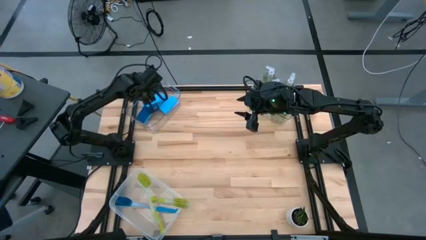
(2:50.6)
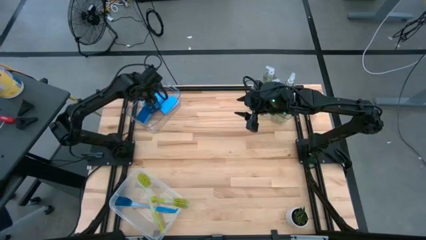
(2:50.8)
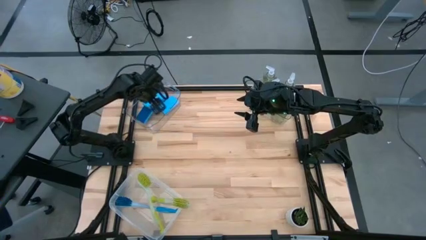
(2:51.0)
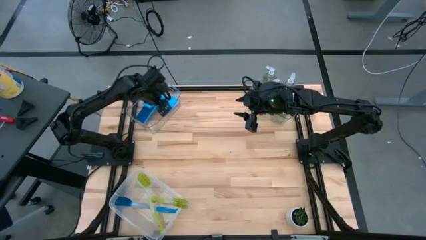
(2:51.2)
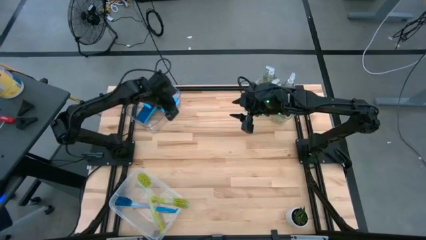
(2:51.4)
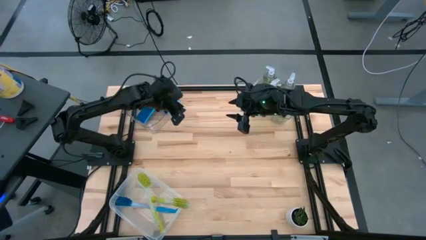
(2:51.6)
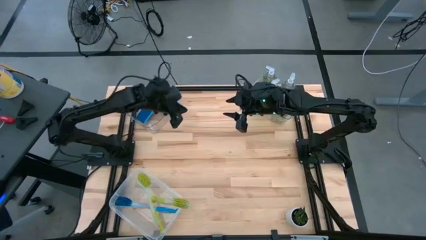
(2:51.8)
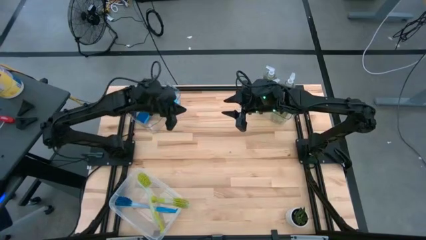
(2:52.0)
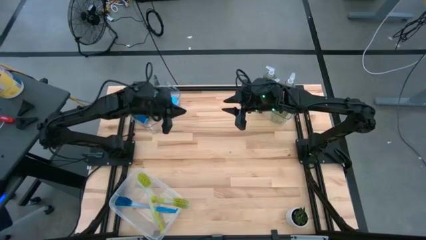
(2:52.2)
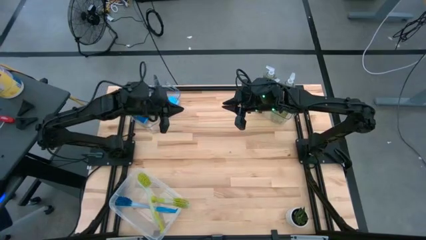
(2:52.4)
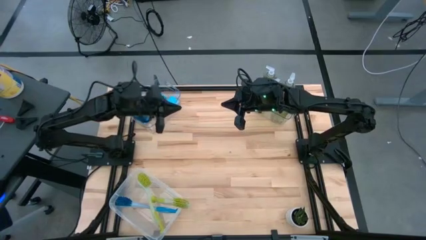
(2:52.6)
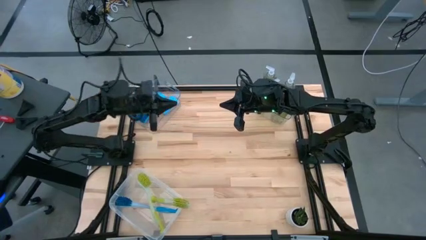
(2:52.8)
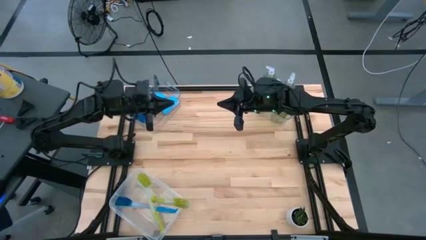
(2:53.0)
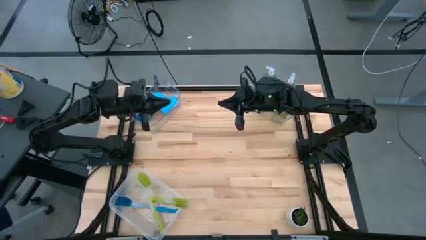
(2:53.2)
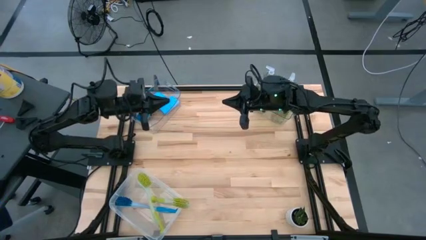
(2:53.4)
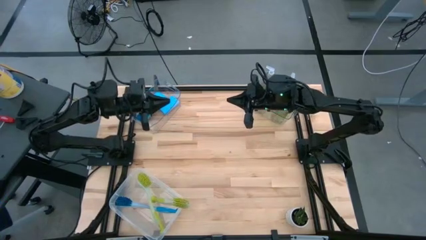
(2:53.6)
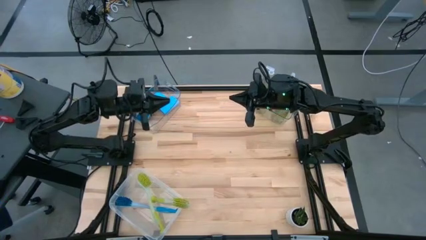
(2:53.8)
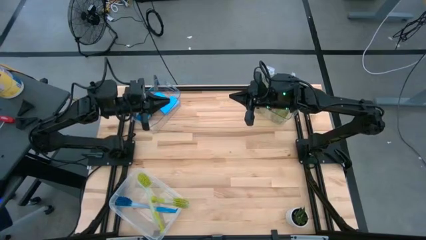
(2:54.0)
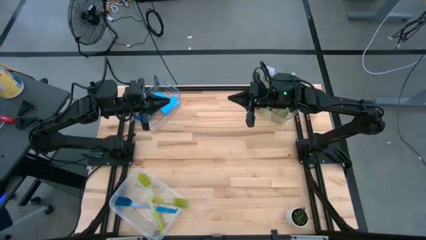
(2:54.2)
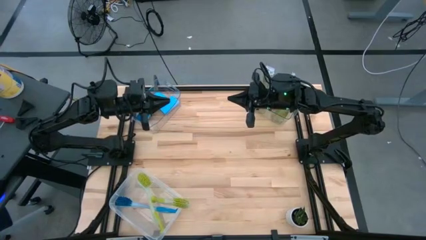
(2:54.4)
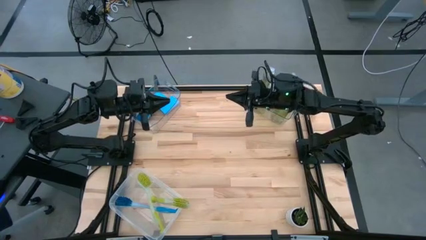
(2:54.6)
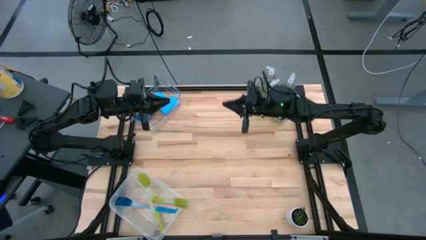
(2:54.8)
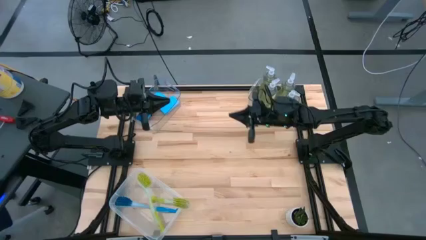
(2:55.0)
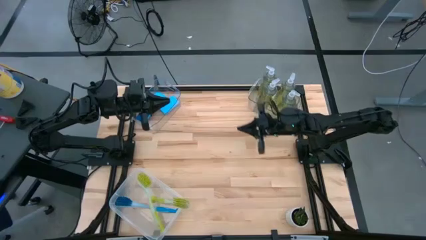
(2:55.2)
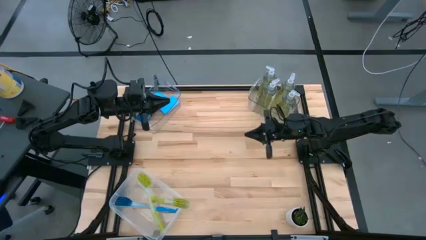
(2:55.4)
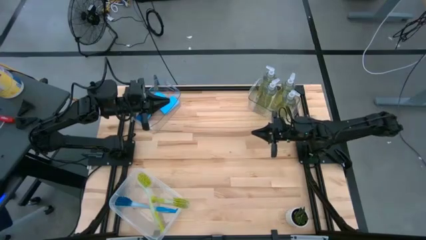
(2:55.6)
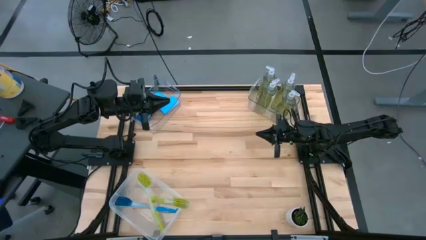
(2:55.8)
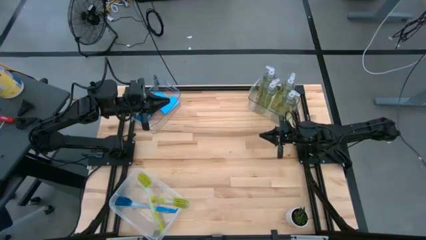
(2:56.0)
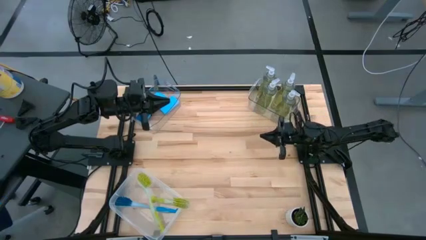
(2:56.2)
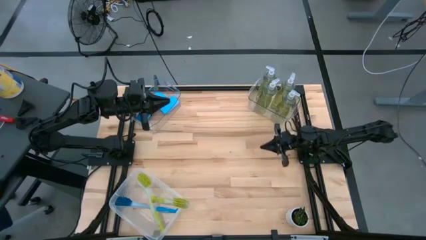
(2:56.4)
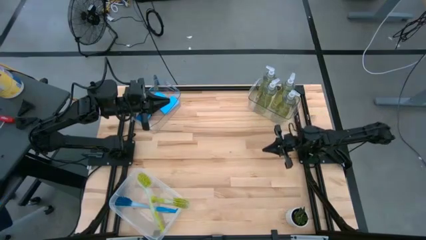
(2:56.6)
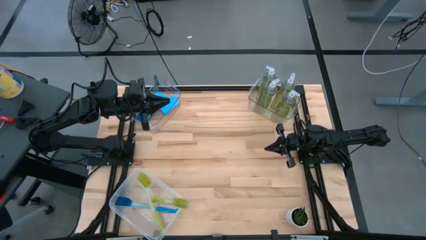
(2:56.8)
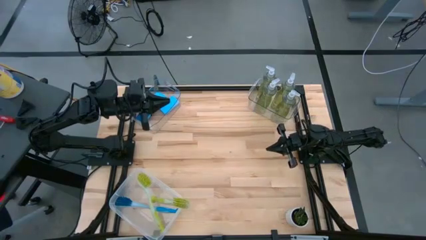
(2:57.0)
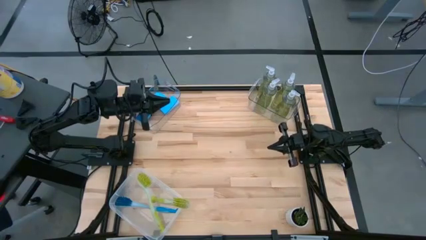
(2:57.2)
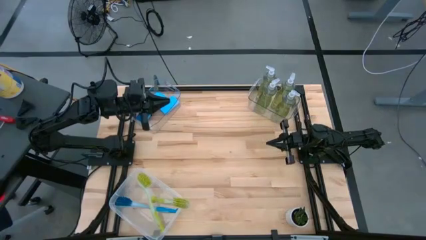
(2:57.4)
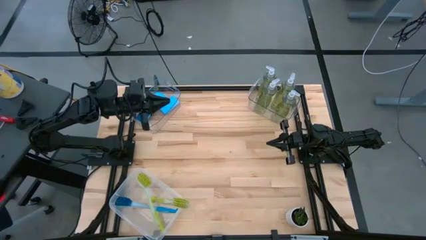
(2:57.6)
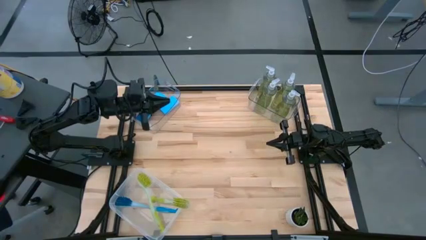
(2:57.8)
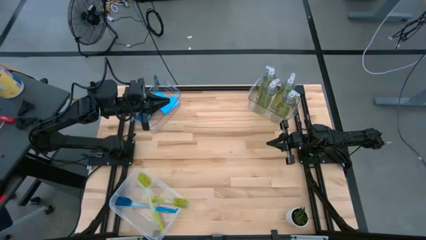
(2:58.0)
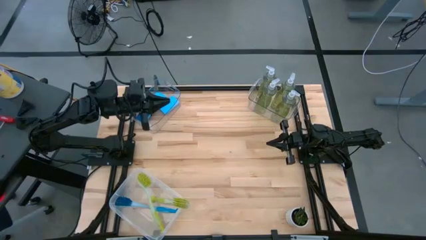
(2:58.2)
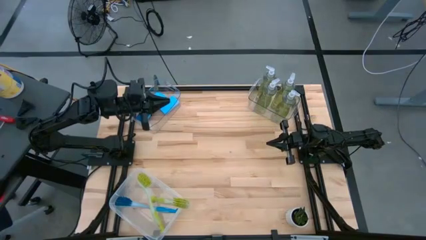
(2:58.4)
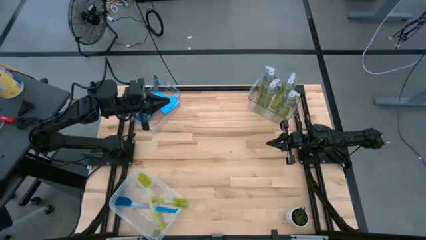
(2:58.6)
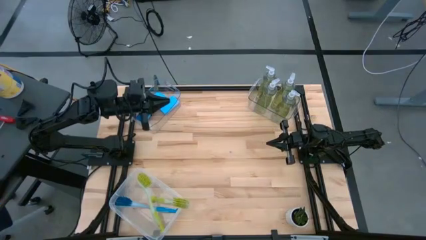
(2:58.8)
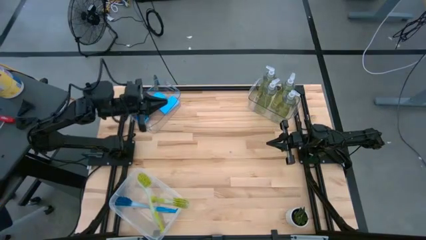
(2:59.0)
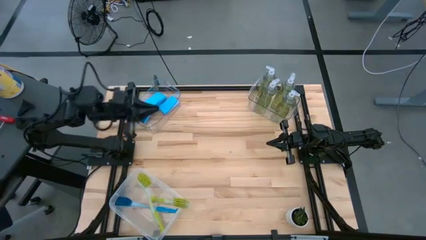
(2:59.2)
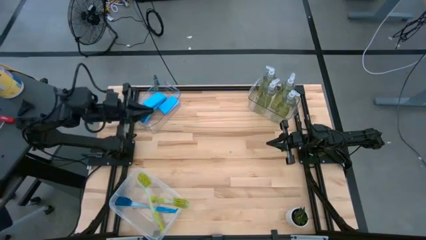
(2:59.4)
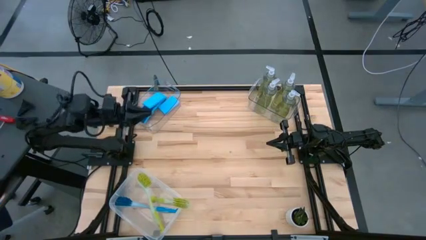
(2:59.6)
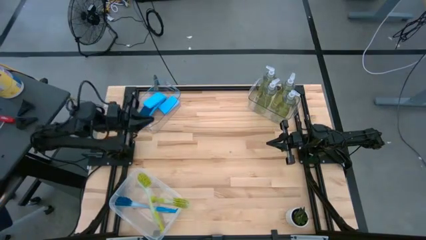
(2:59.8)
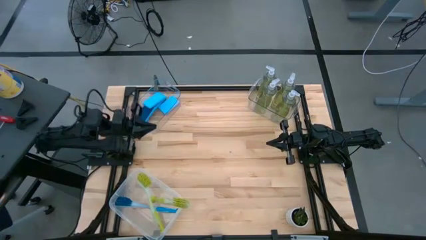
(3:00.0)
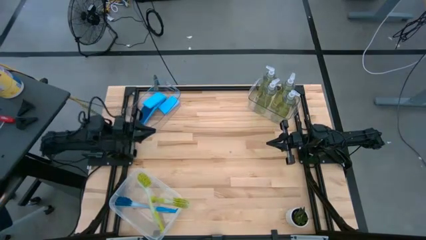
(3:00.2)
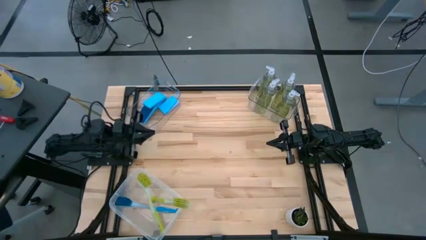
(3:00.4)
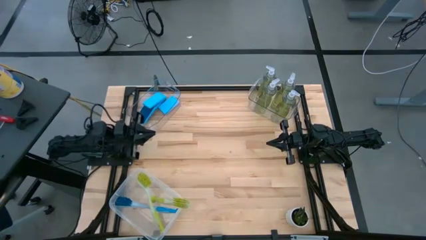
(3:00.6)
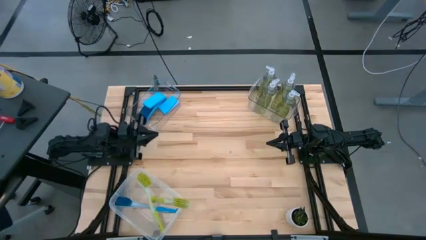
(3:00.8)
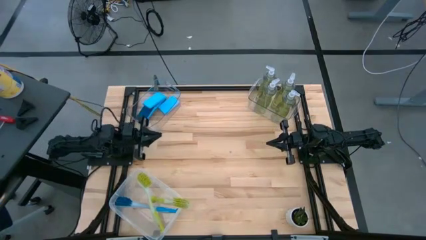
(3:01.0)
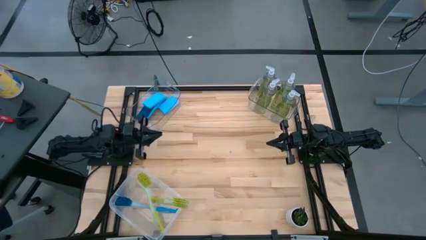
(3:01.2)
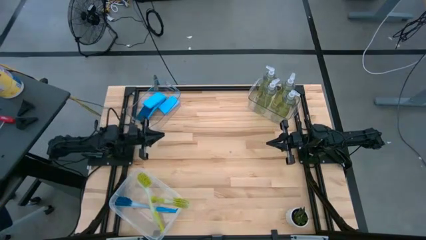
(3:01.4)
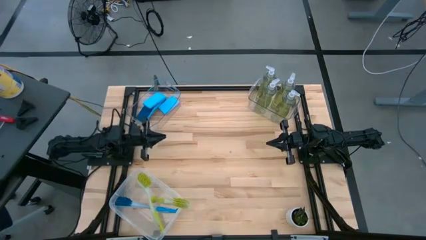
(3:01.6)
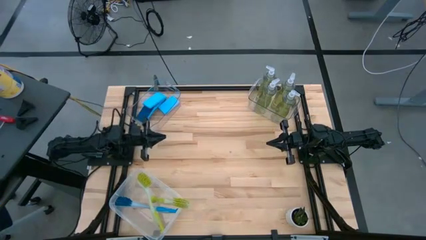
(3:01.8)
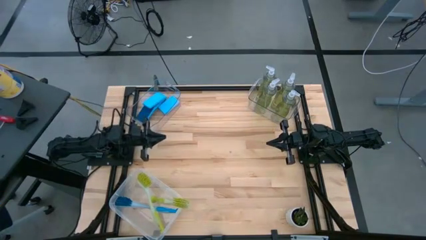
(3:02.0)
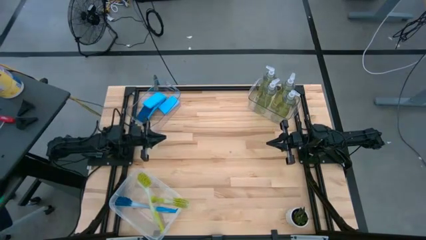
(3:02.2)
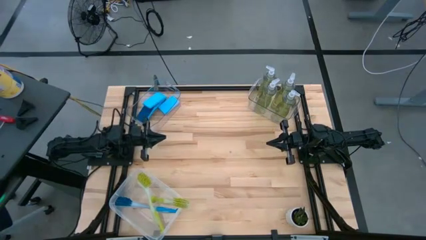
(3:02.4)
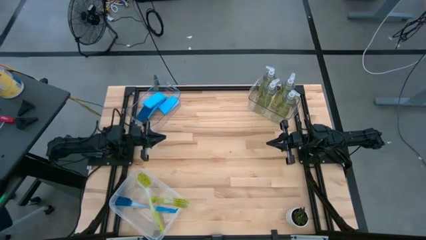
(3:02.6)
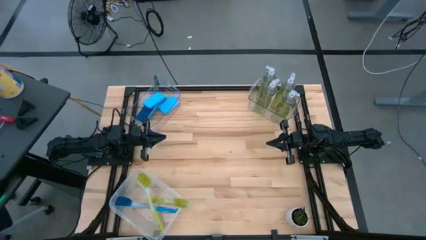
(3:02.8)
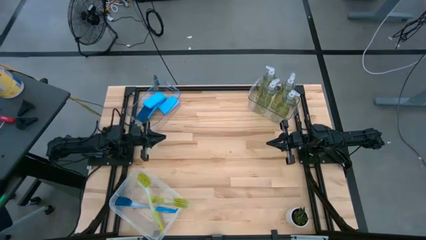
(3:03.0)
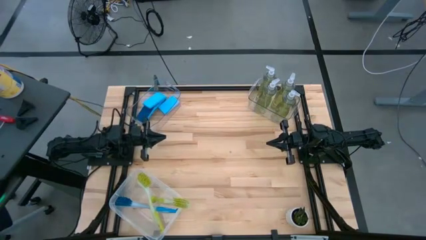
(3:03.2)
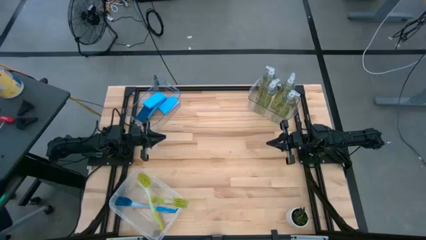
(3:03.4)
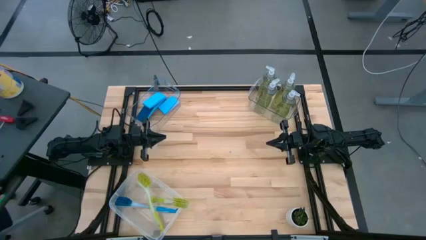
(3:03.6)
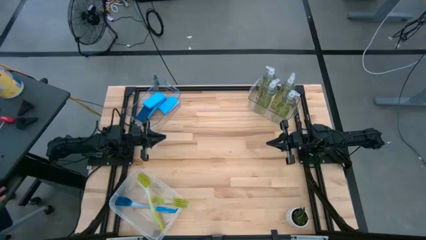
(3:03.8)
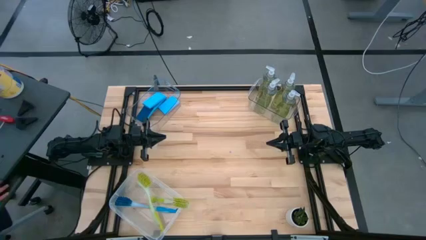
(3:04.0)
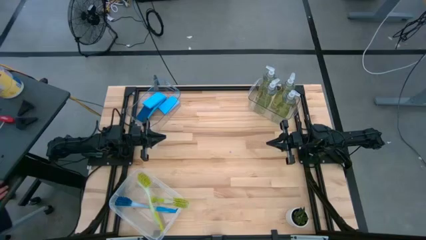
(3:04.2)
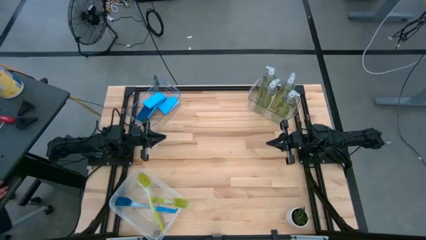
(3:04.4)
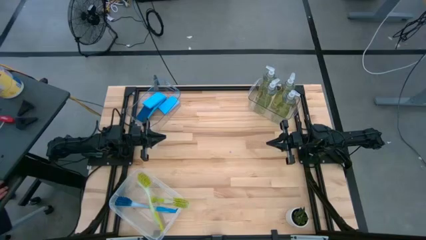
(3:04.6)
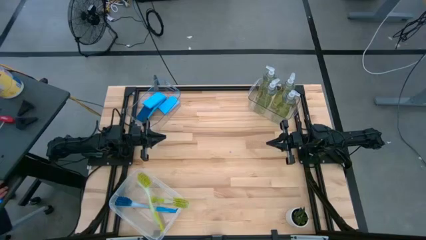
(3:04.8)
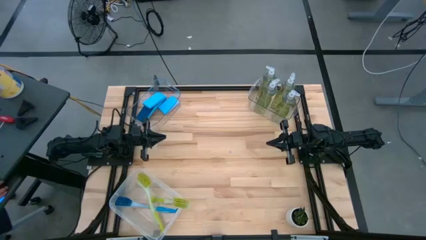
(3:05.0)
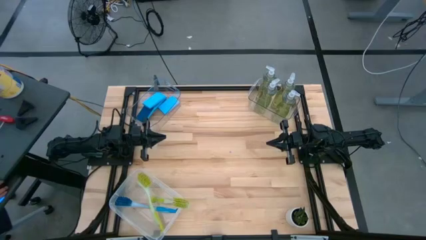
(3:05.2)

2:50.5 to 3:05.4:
Task: Pick & Place Kitchen Sink Supplies
Return to Home Position

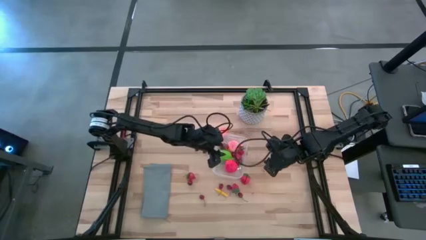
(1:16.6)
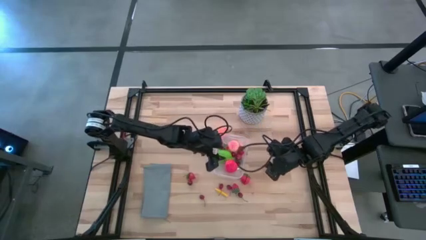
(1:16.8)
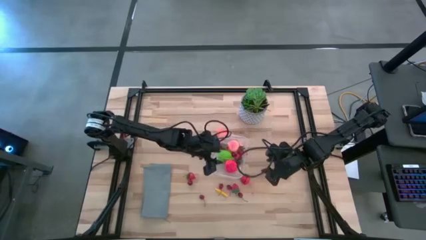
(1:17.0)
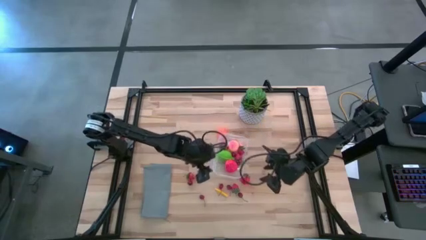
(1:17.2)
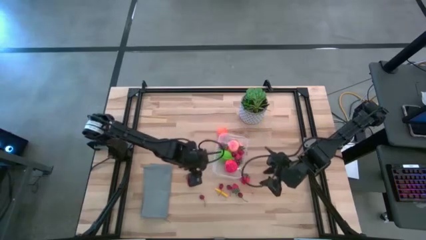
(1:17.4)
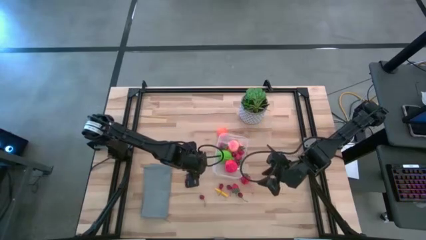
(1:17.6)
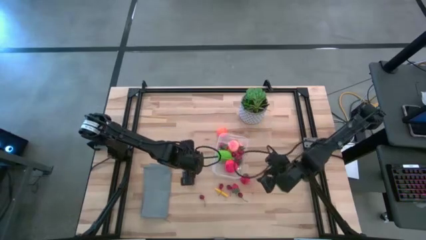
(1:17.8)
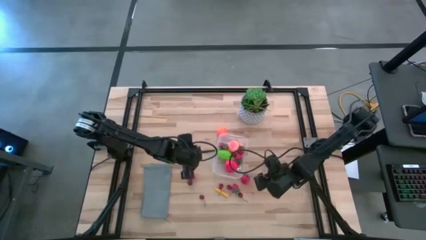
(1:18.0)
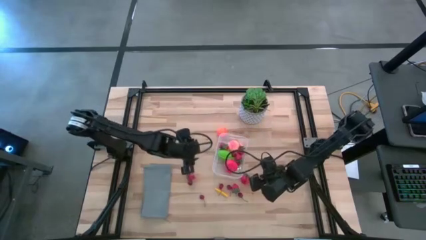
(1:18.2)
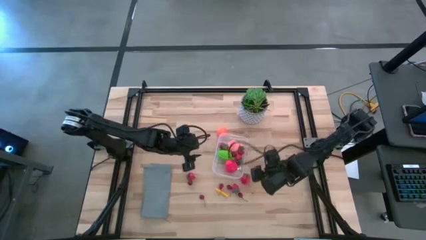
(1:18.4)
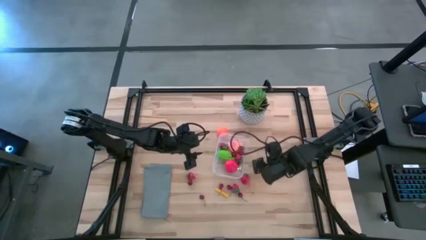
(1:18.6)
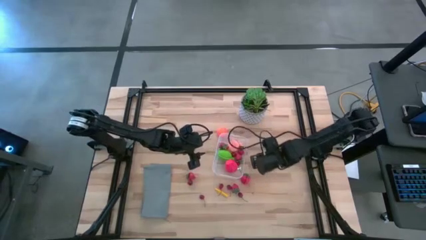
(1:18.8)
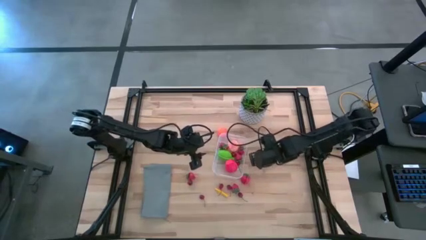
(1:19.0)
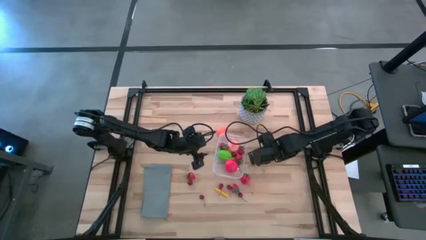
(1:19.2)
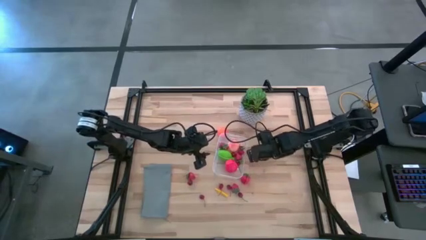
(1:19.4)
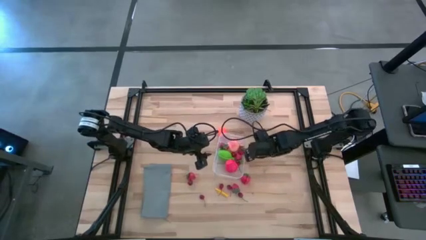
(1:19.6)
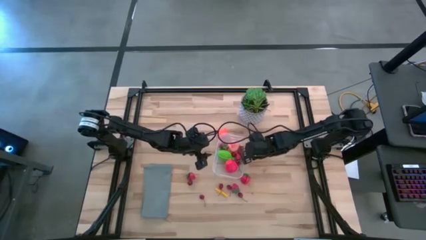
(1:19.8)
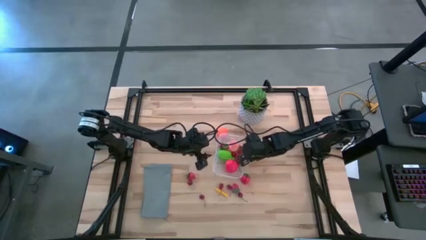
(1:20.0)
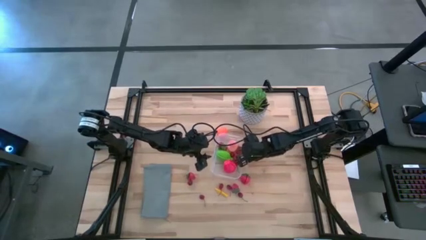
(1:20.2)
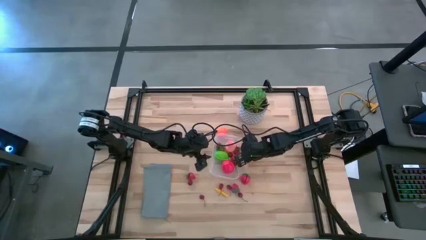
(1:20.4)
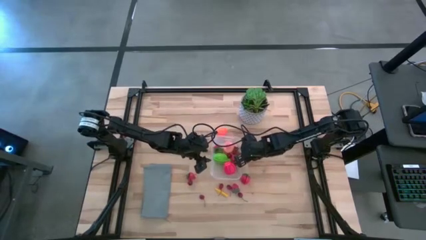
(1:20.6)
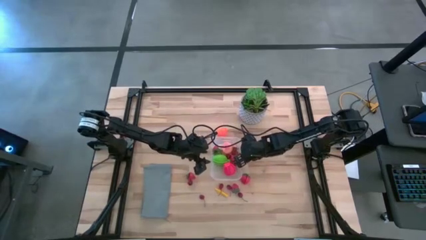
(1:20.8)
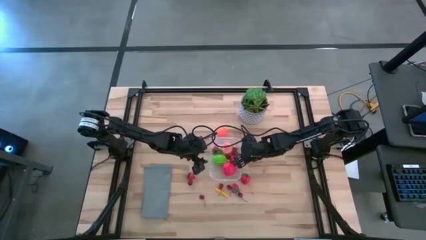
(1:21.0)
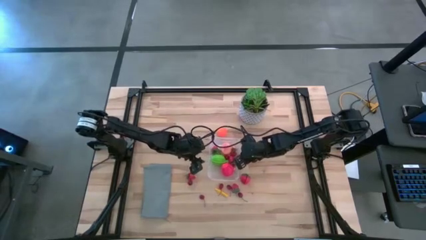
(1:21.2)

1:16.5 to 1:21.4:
Task: Pick and placing Produce into tupperware
Adjust the transparent bin
